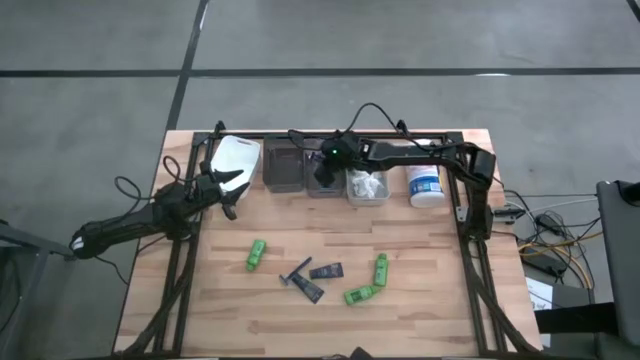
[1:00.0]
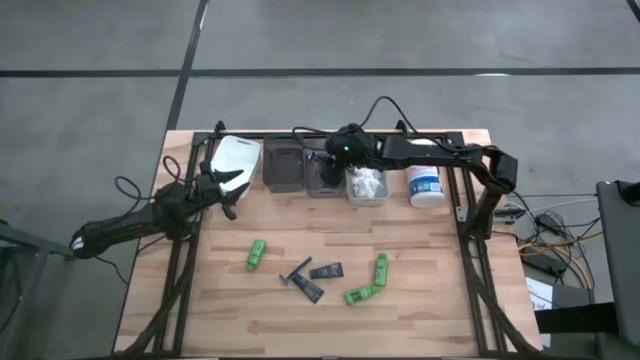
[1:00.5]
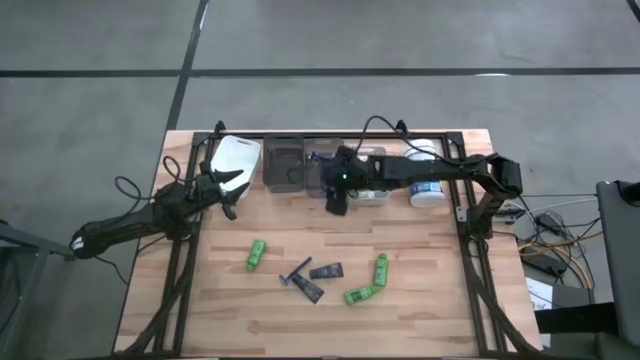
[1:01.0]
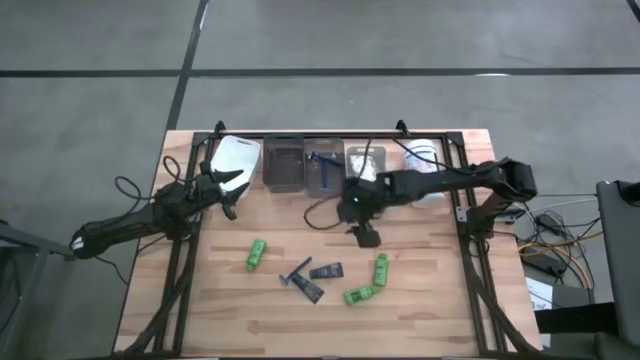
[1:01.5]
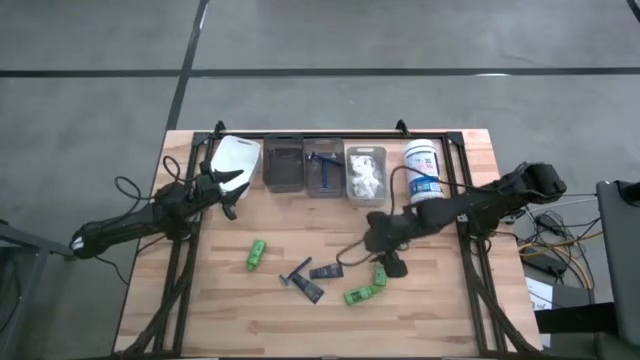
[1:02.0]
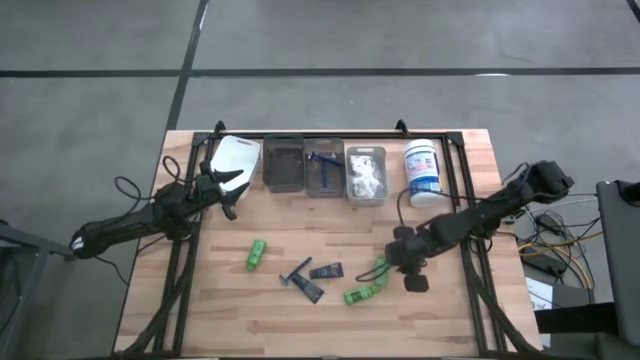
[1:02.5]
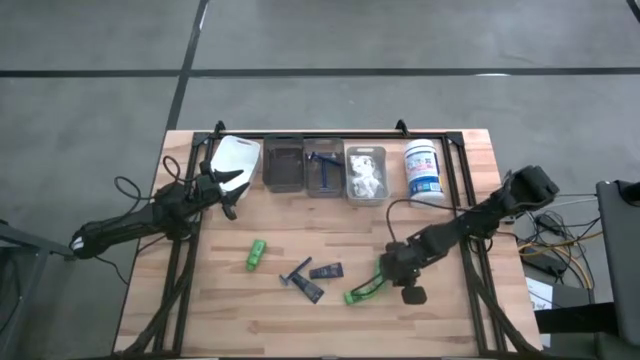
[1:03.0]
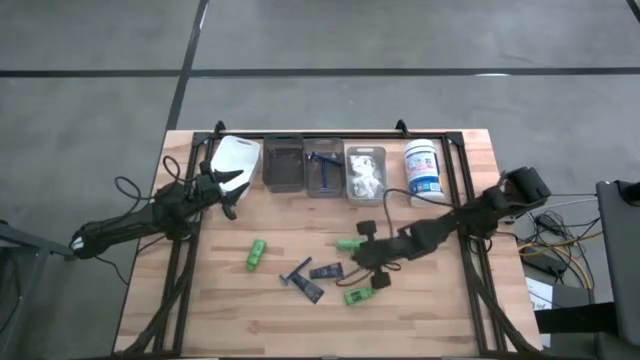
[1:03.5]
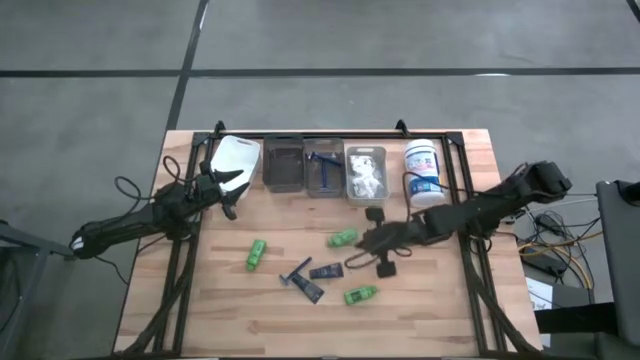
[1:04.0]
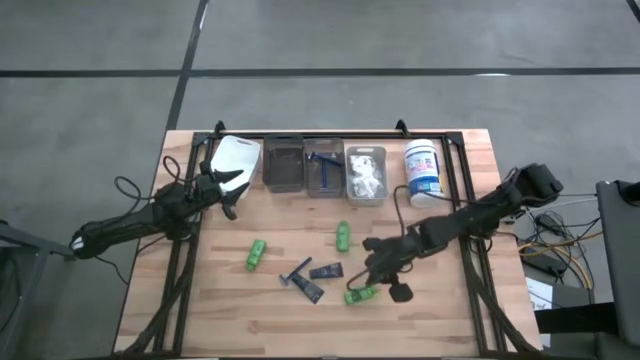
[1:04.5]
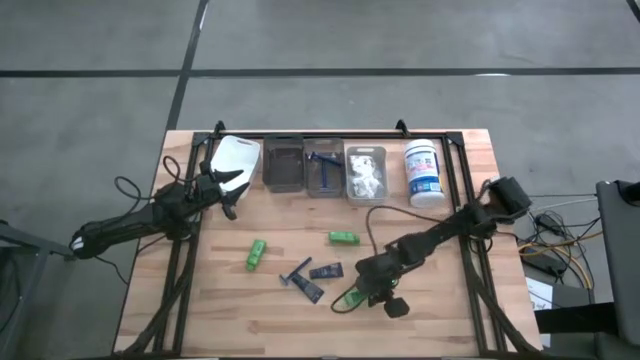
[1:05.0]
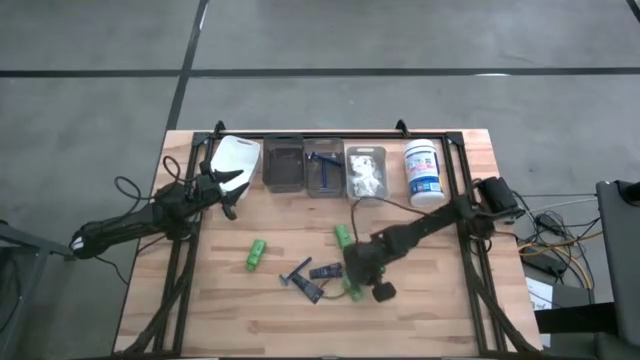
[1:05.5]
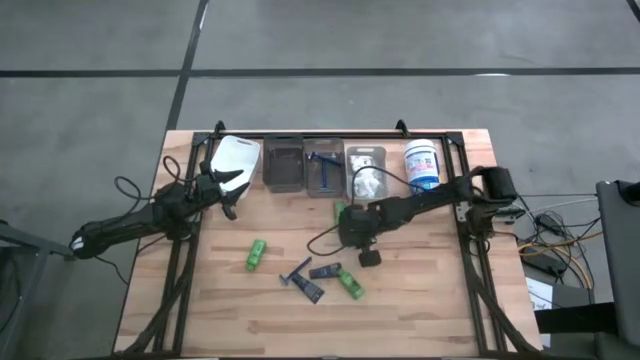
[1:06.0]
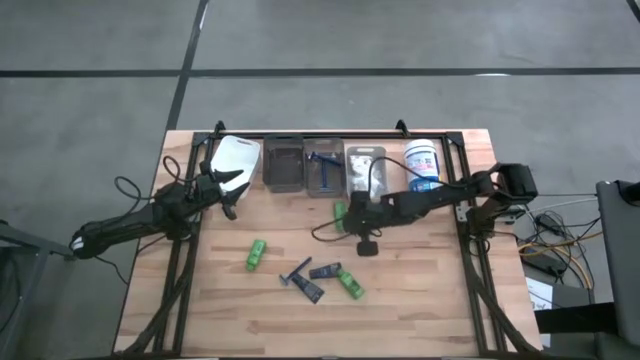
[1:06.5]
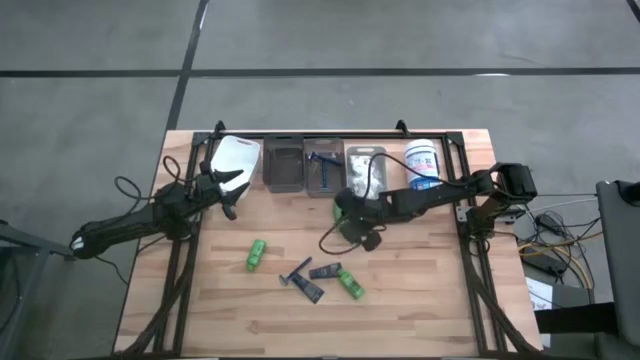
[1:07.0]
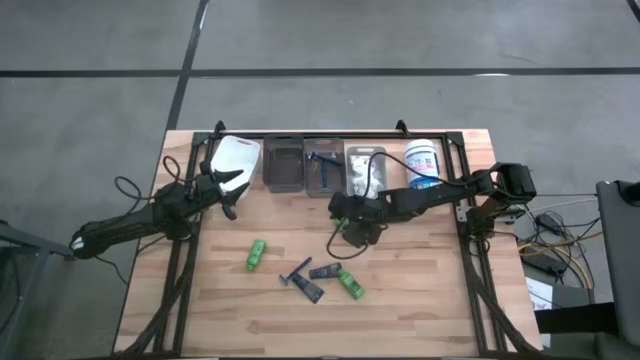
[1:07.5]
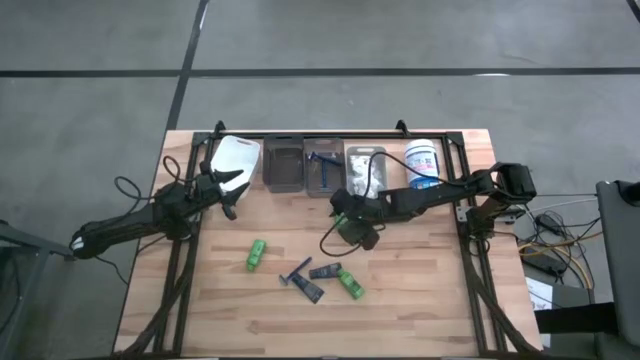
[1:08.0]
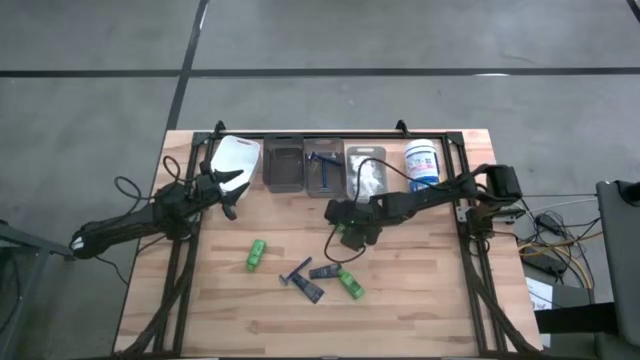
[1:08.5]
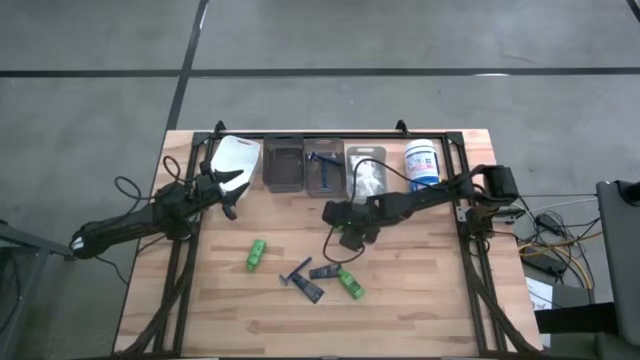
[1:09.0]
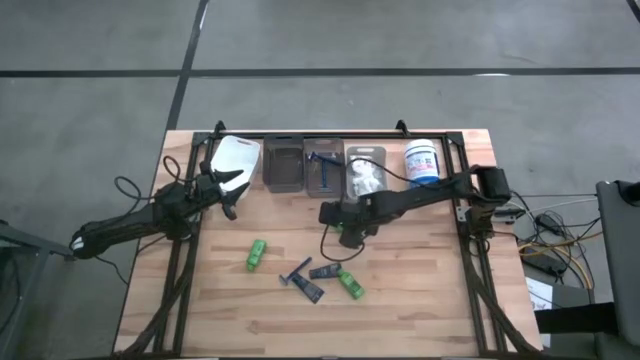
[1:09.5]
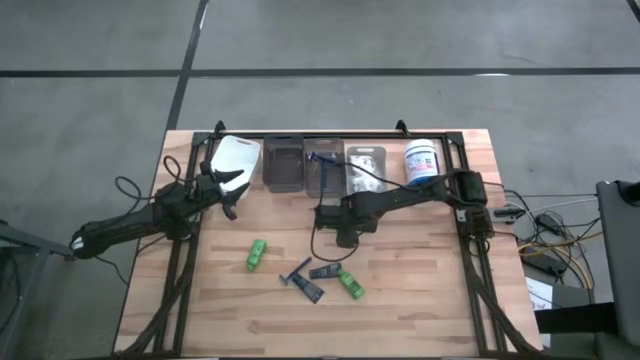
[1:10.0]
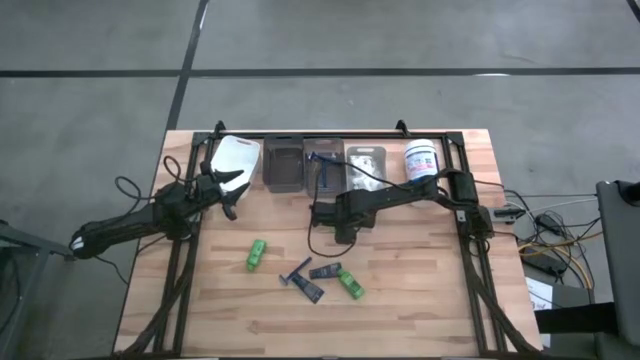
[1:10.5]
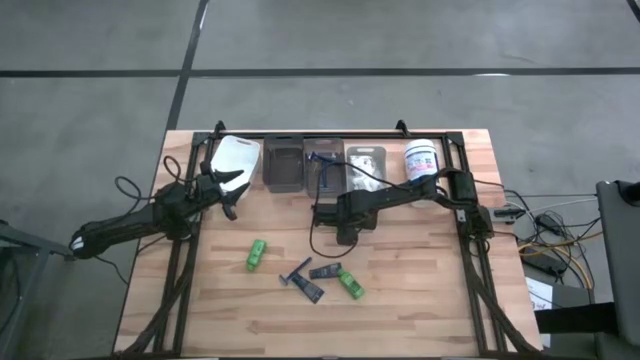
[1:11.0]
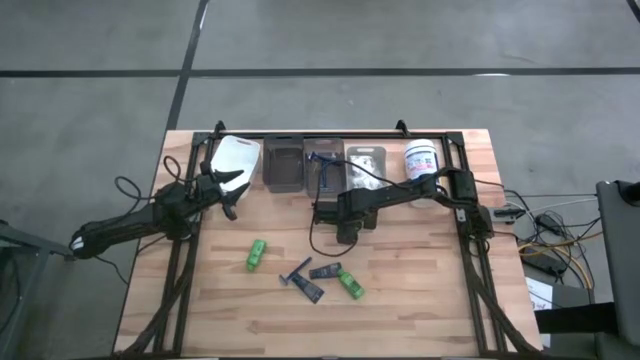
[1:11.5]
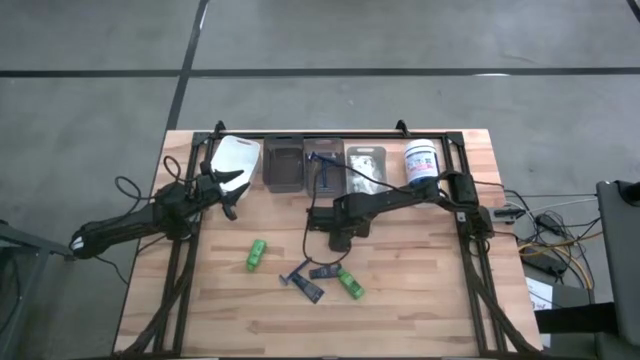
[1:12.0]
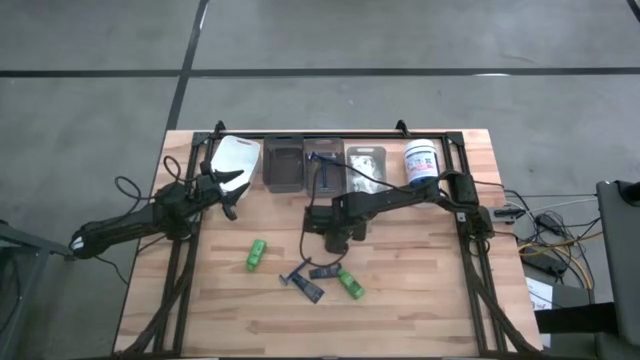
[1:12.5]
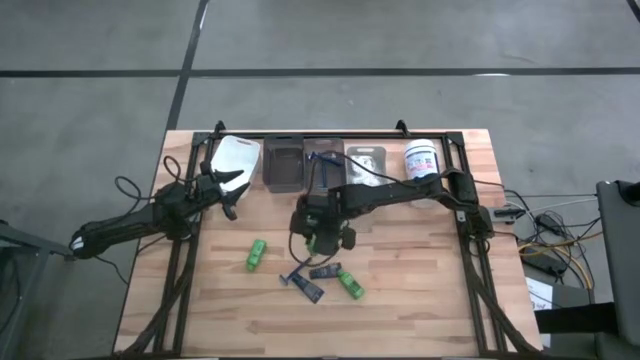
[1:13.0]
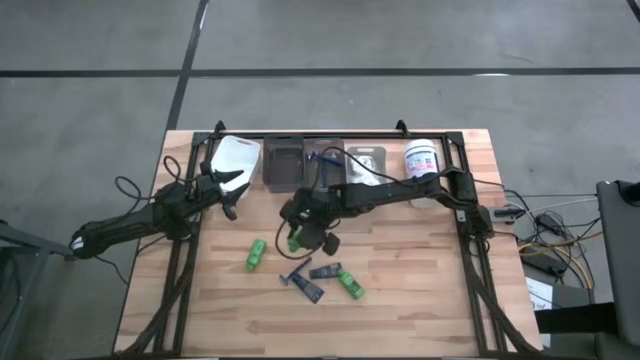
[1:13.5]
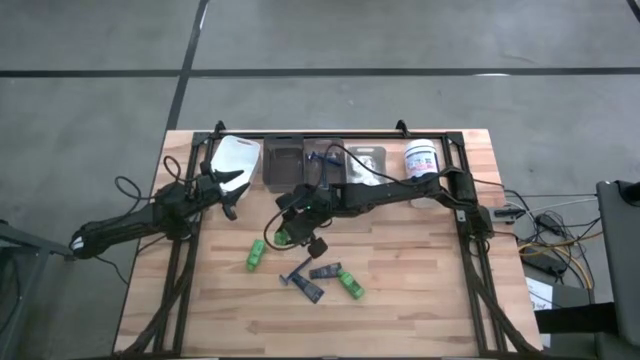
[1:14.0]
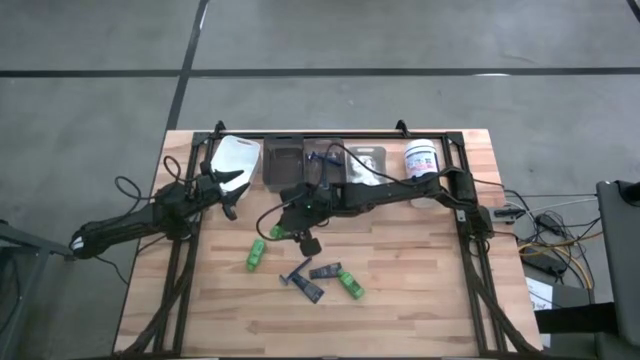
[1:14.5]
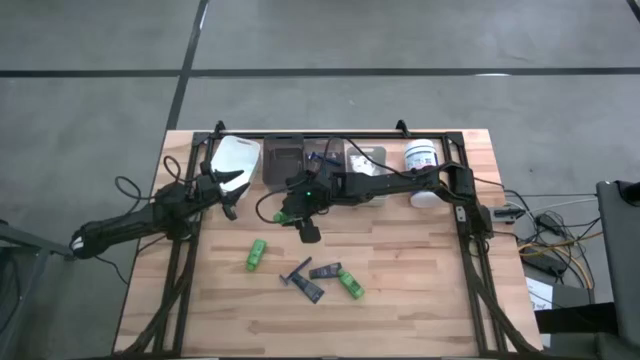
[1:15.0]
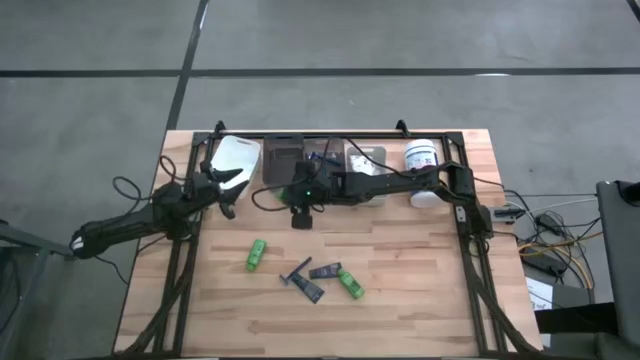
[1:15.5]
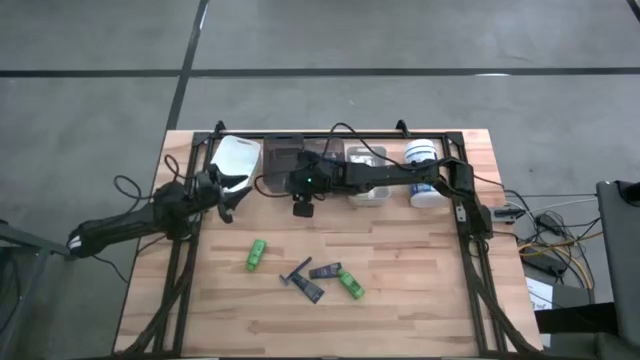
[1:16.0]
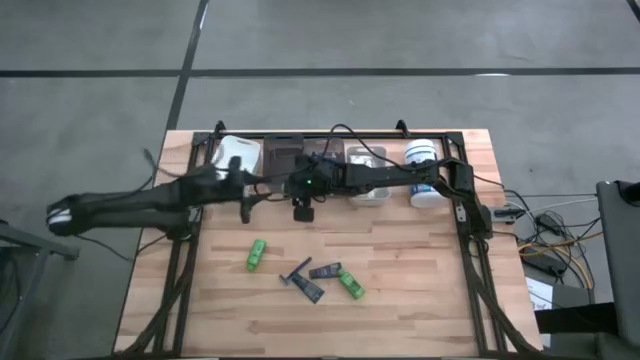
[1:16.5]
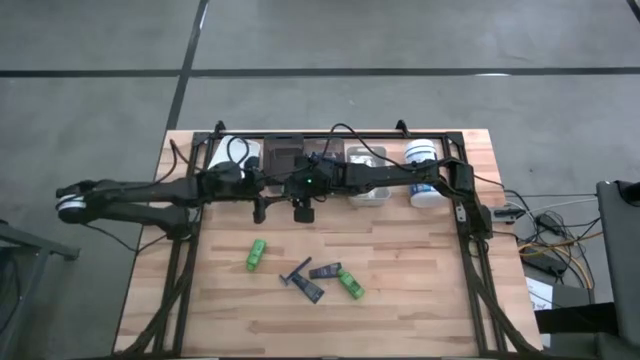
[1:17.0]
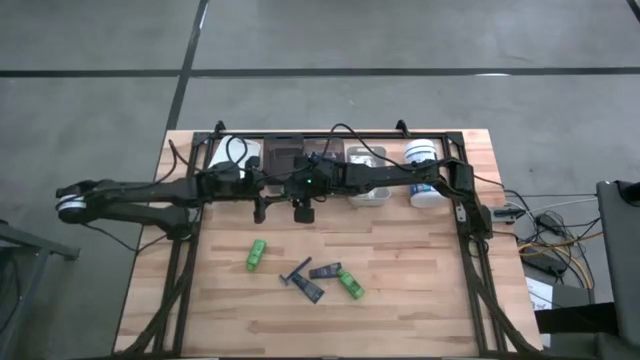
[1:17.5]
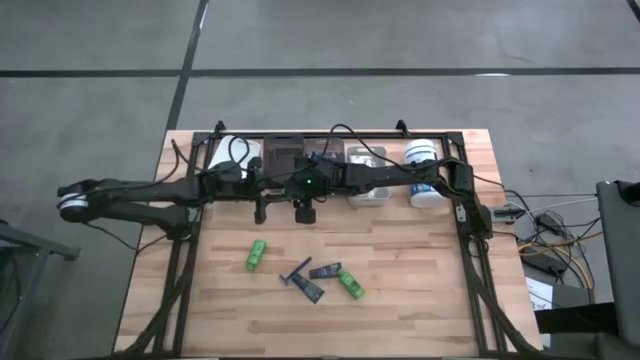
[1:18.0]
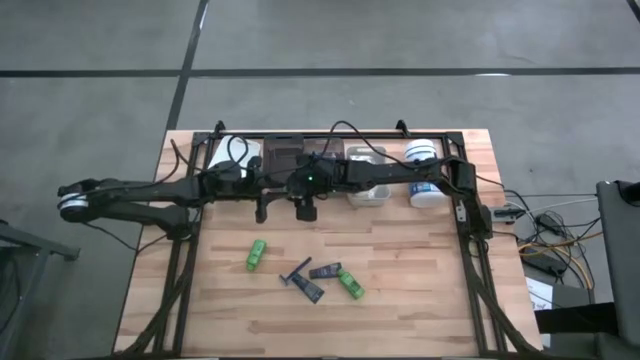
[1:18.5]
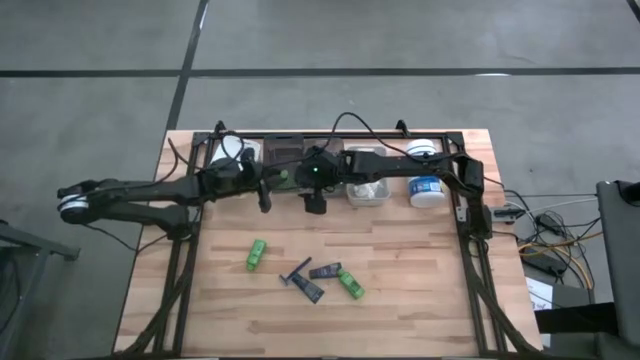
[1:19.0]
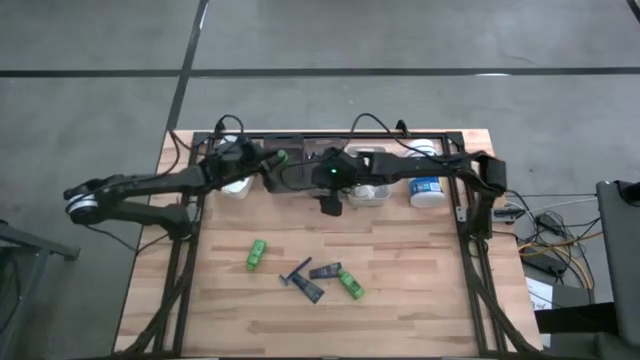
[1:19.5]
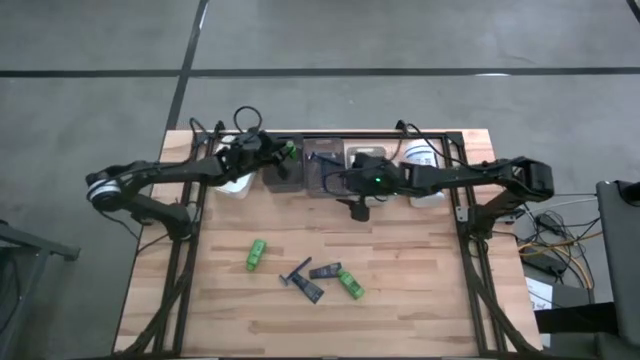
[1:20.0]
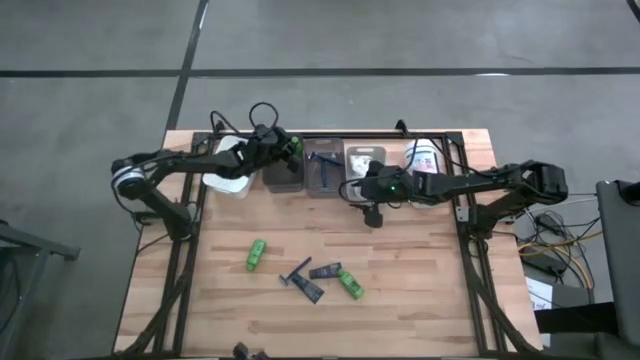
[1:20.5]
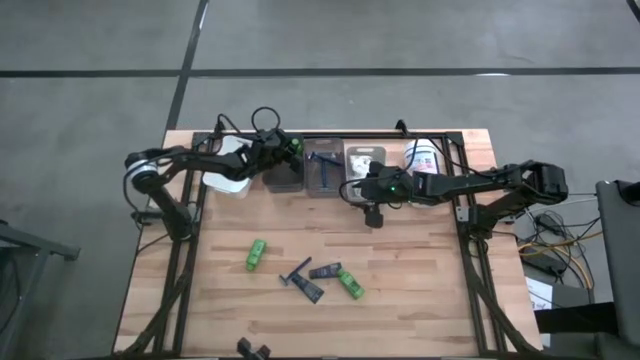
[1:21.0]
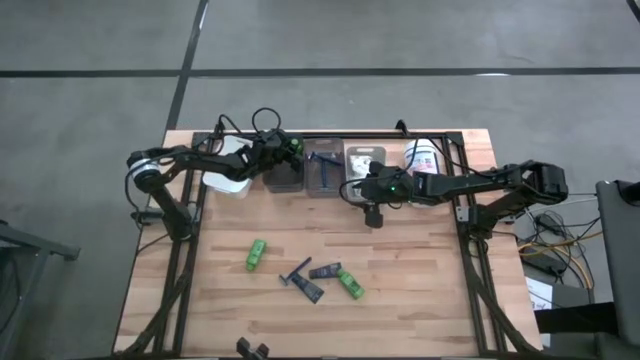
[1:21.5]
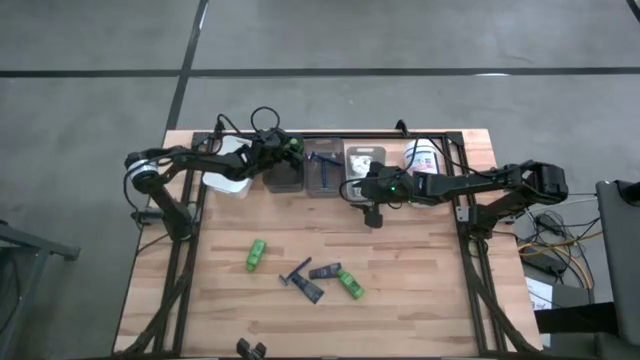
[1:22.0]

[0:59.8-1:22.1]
Task: Pick & Place Travel size toiletries
Put the top right shampoo into the left black bin
